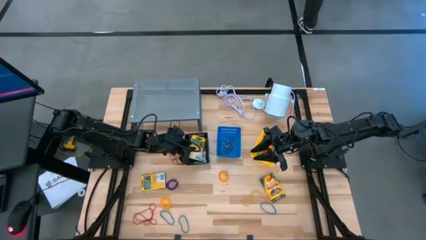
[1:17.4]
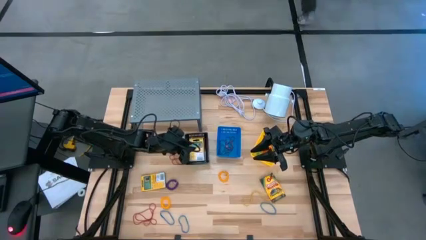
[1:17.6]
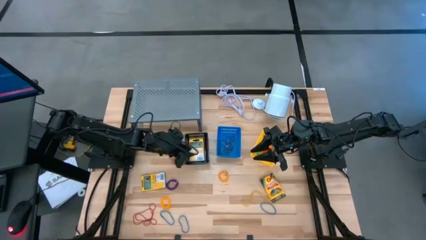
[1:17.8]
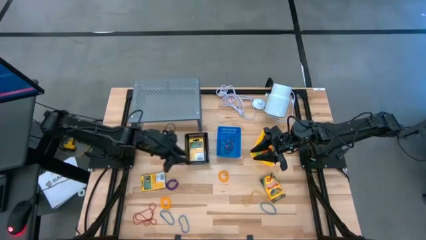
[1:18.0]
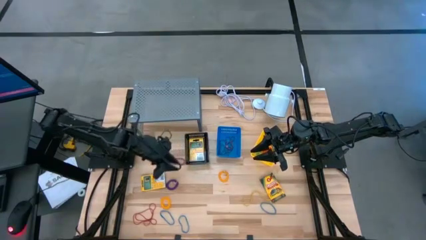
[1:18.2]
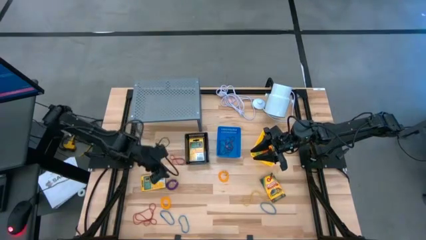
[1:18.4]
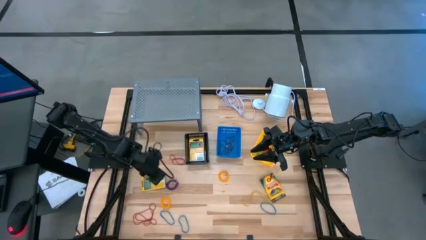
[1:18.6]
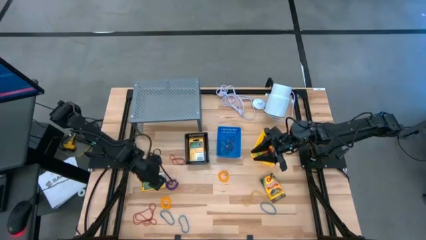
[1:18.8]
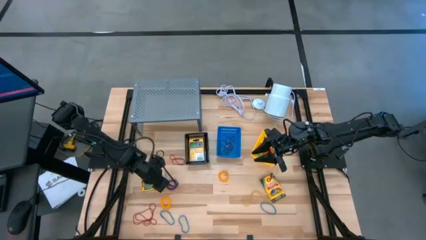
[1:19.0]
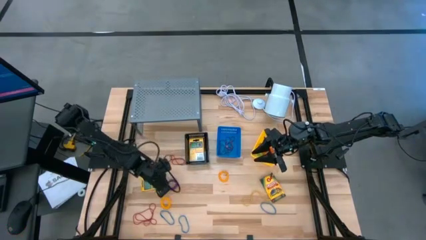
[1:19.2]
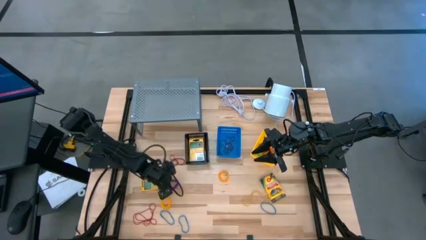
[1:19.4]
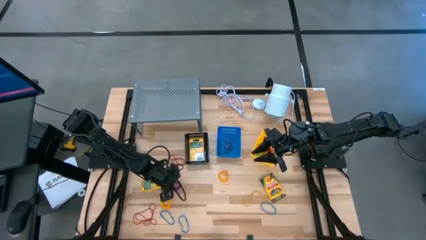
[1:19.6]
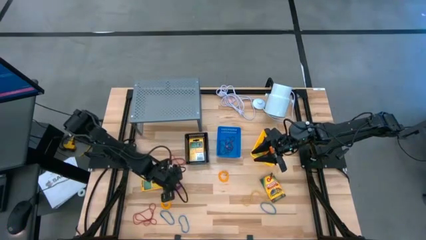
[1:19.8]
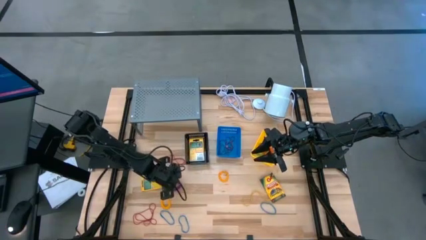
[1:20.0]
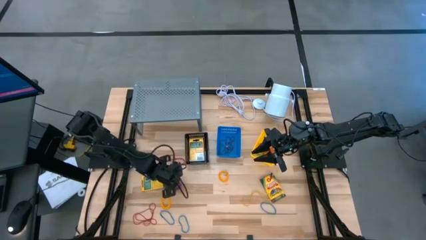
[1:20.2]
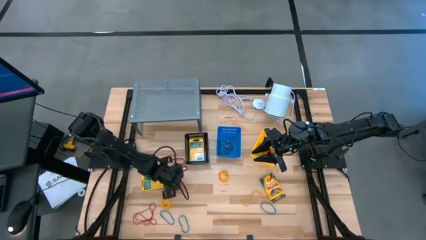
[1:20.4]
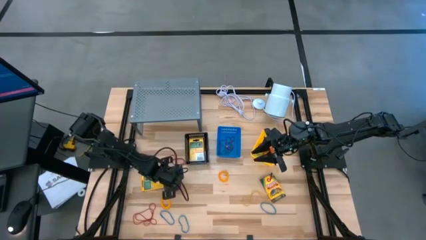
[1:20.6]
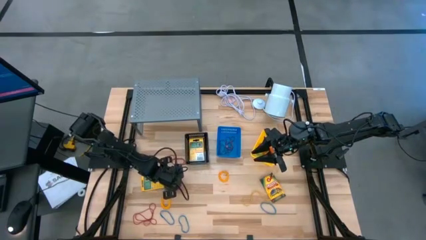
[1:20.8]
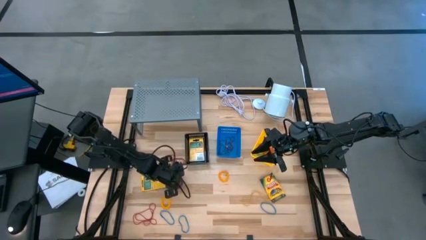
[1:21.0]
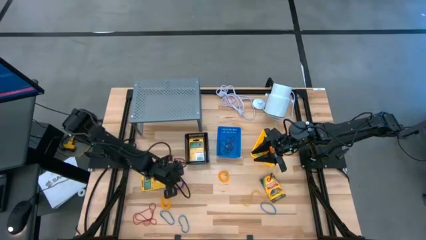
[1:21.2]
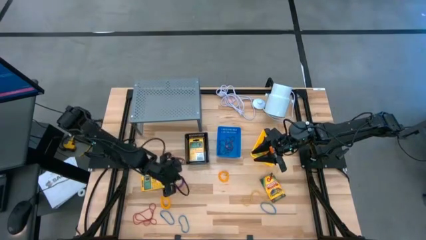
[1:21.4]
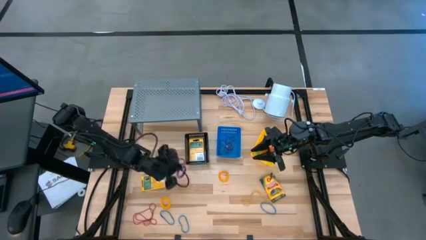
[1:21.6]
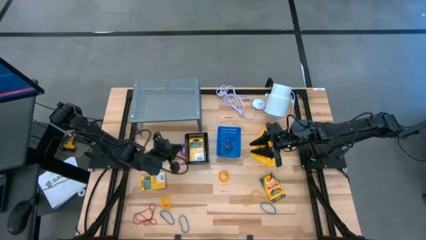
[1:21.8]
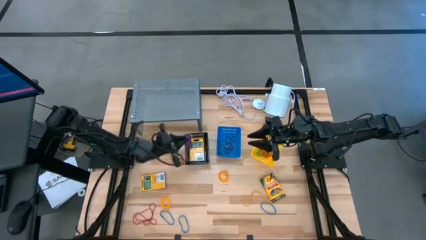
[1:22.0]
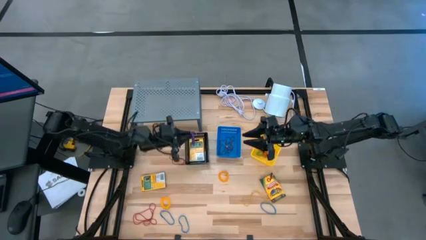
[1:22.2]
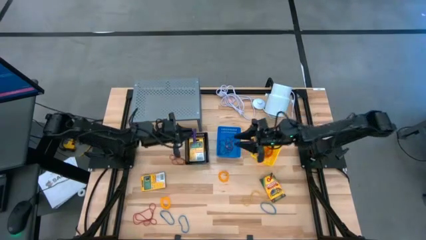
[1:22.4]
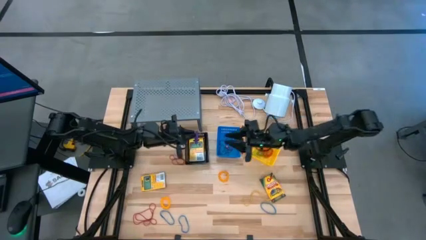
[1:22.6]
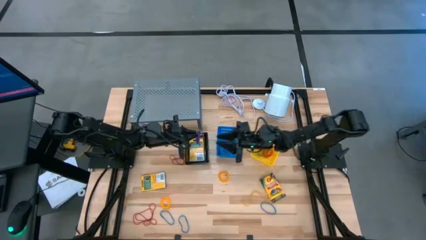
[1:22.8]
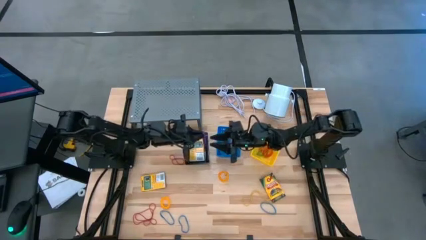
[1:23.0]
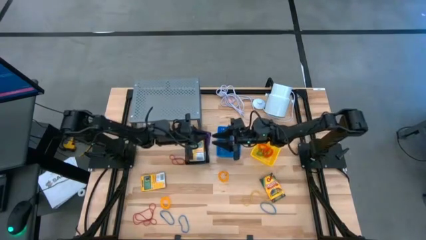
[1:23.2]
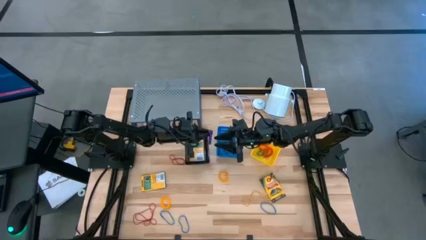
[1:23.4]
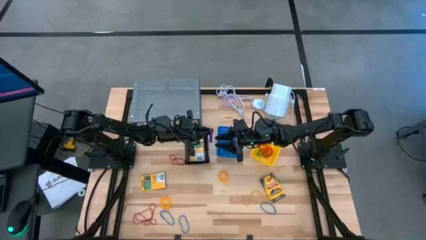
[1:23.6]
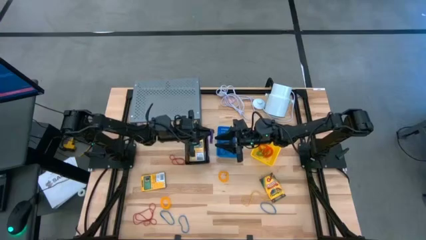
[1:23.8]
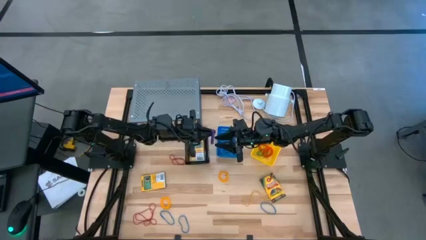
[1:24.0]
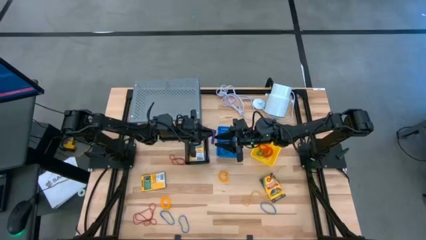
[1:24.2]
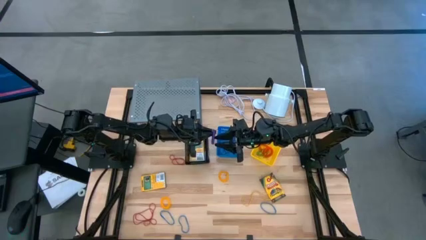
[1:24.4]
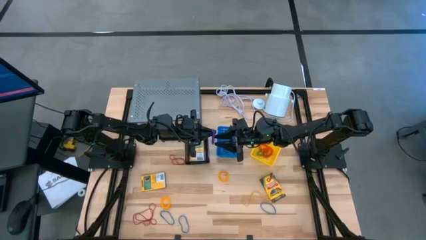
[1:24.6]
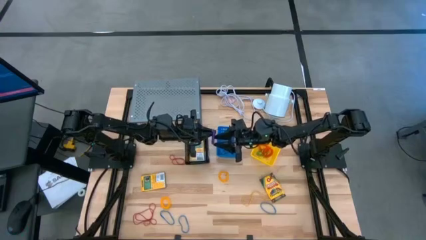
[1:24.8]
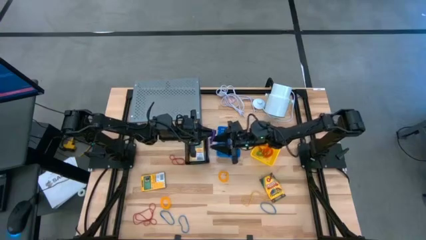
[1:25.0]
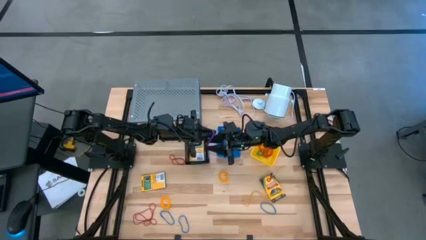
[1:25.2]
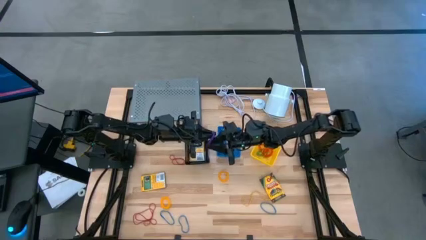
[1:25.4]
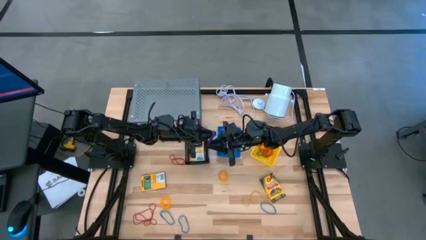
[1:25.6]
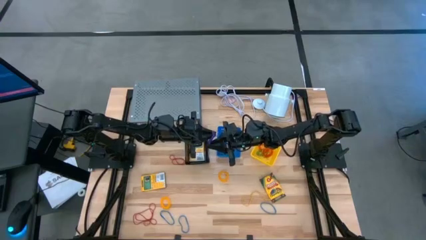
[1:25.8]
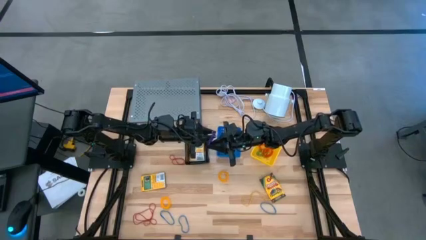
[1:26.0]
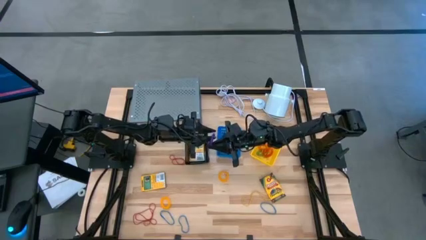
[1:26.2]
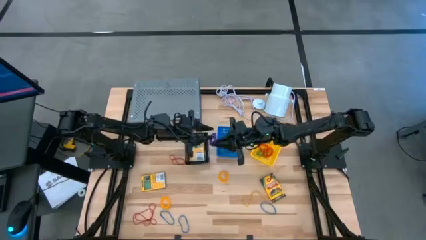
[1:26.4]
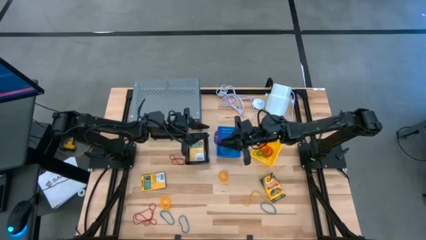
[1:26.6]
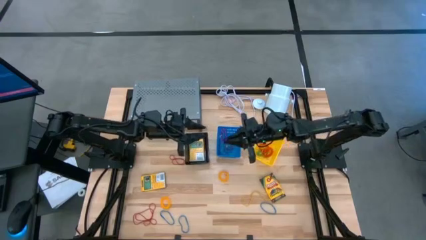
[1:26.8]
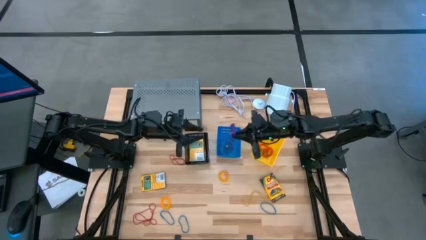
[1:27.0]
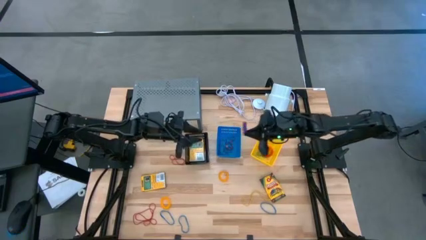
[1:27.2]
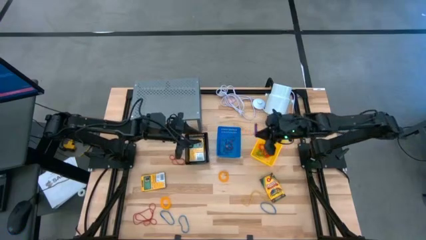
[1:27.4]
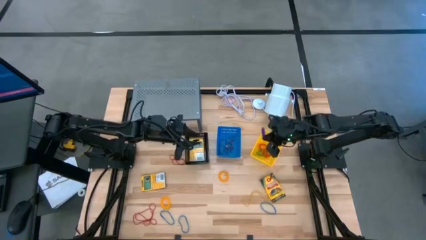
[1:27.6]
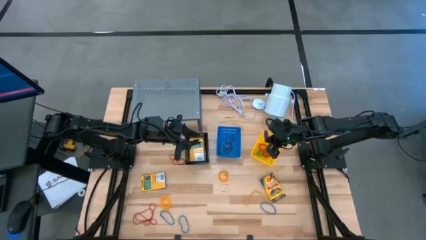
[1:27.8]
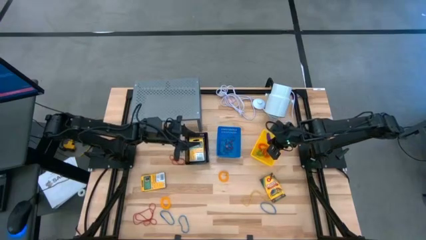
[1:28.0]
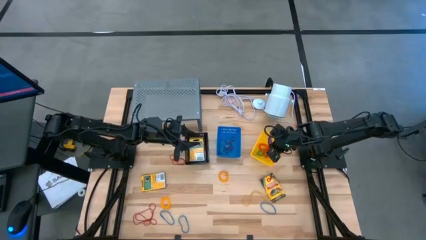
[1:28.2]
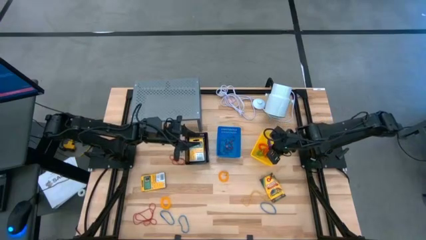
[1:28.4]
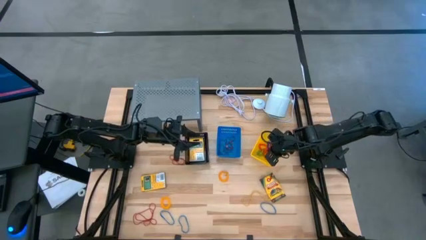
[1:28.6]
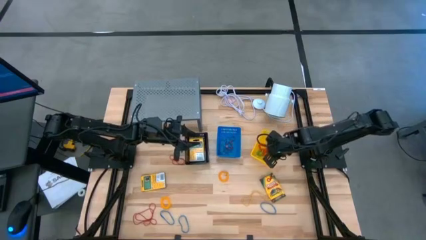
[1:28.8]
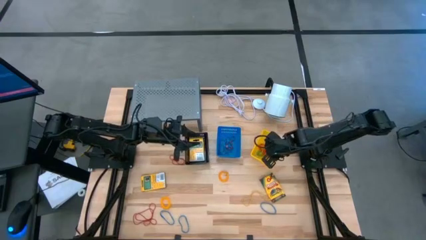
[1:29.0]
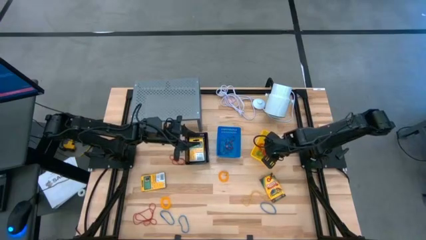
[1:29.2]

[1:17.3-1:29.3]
Task: Pick & Place Office Desk Supplies
Put the violet stretchable key holder into the yellow basket
